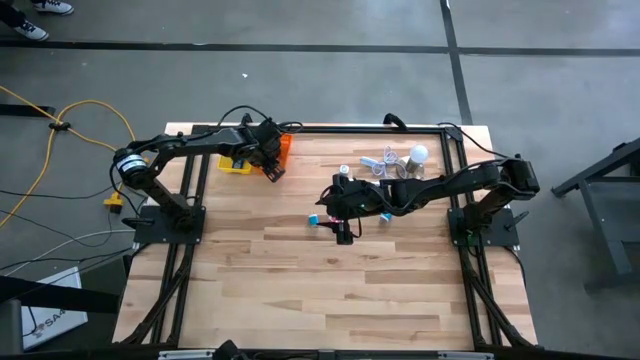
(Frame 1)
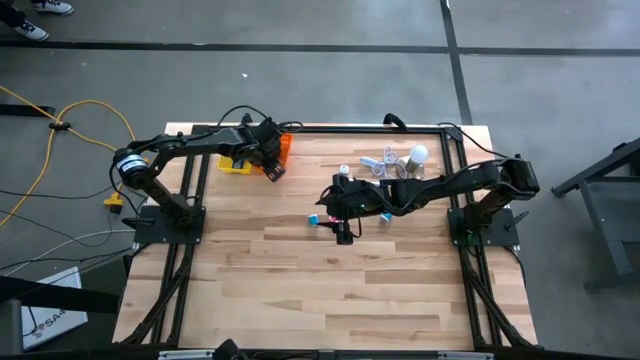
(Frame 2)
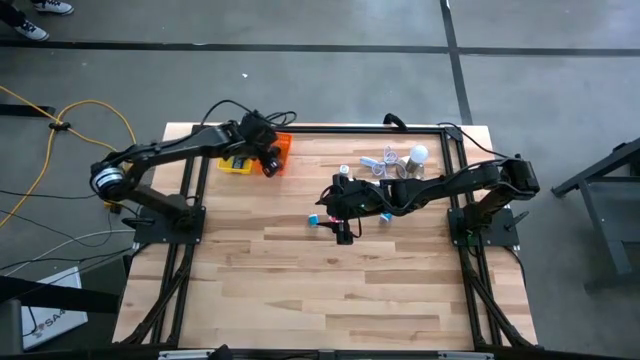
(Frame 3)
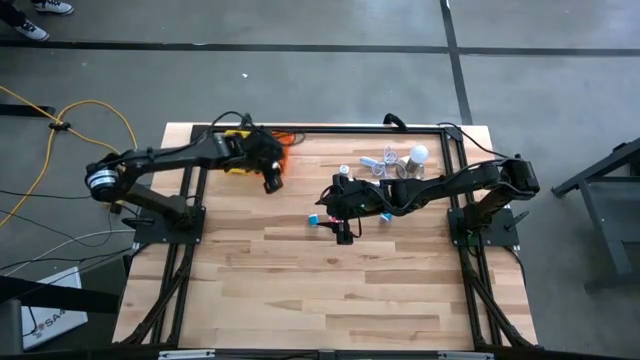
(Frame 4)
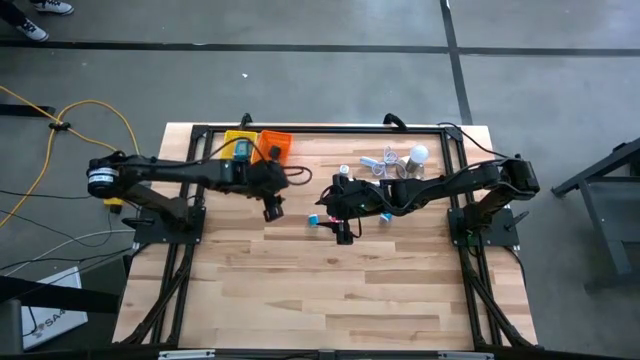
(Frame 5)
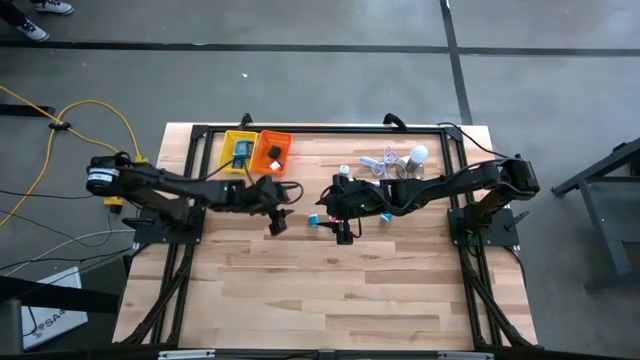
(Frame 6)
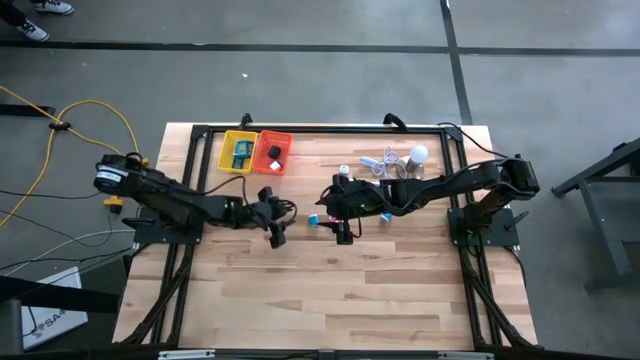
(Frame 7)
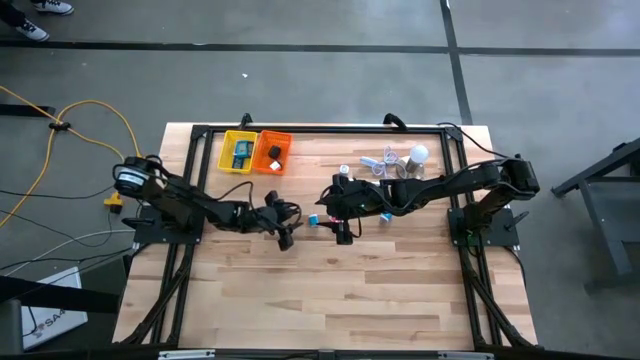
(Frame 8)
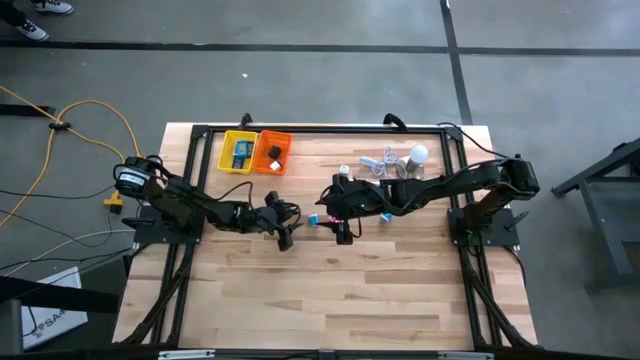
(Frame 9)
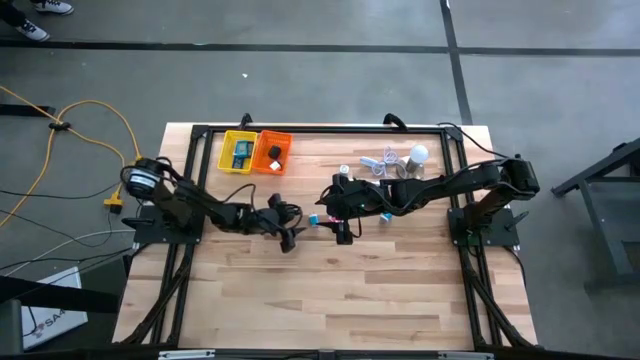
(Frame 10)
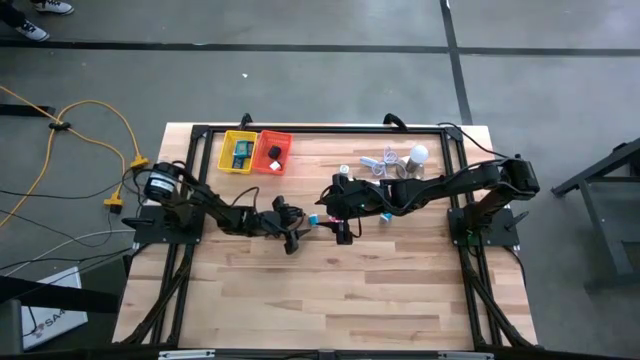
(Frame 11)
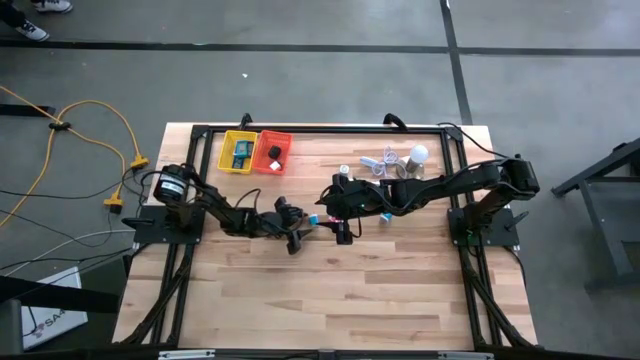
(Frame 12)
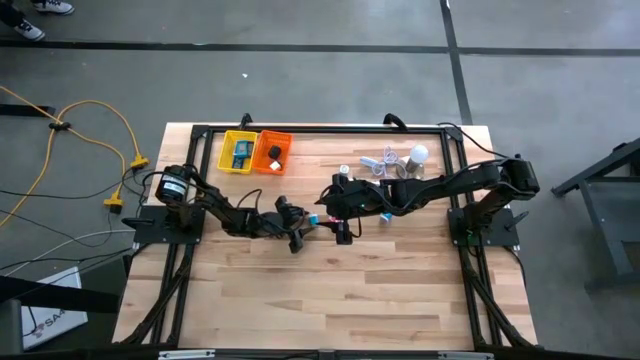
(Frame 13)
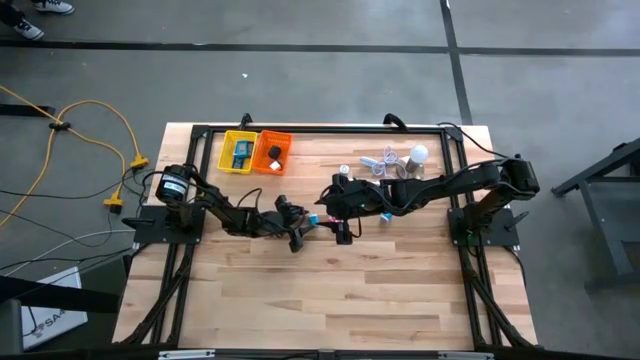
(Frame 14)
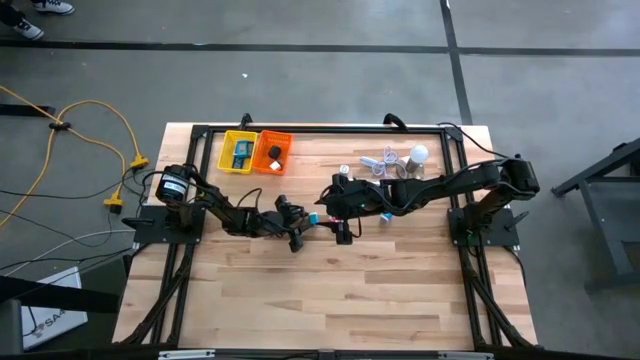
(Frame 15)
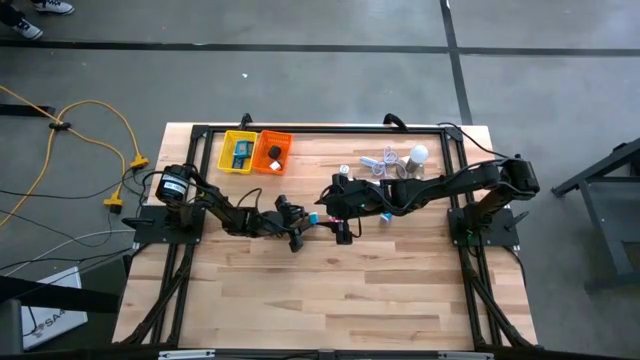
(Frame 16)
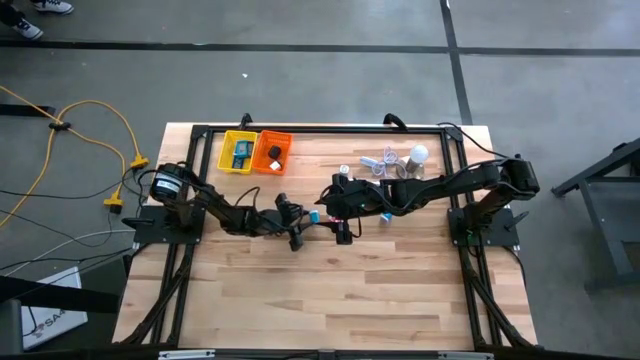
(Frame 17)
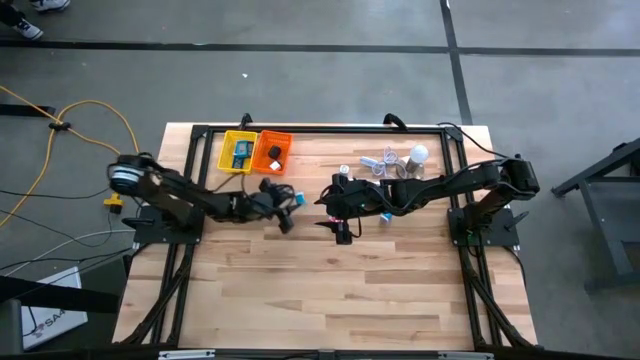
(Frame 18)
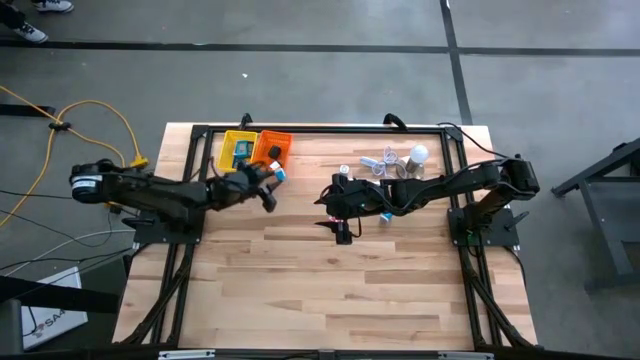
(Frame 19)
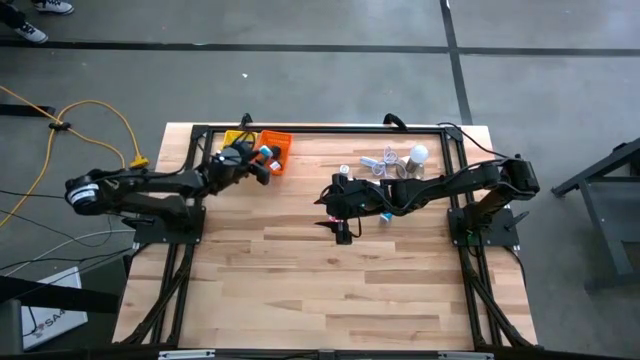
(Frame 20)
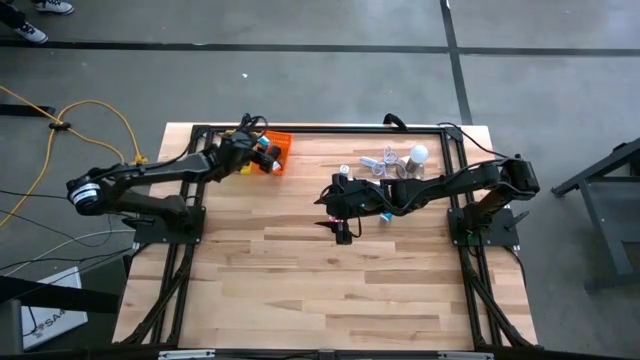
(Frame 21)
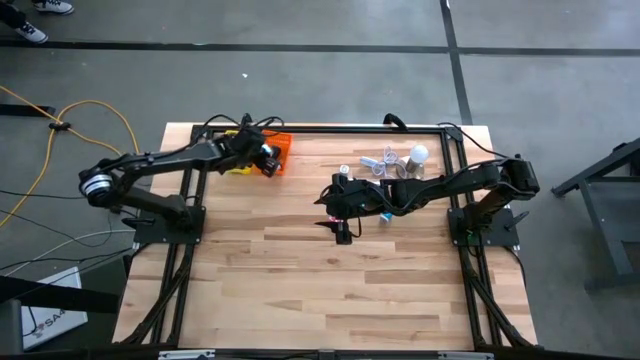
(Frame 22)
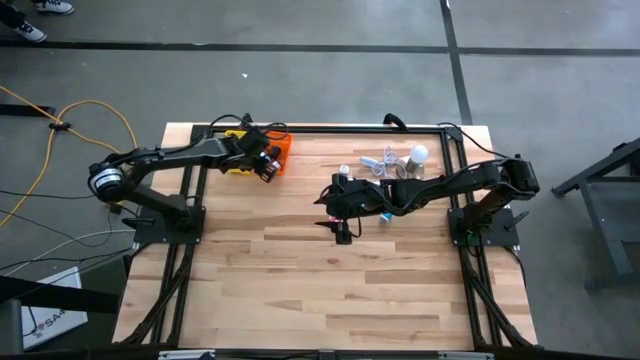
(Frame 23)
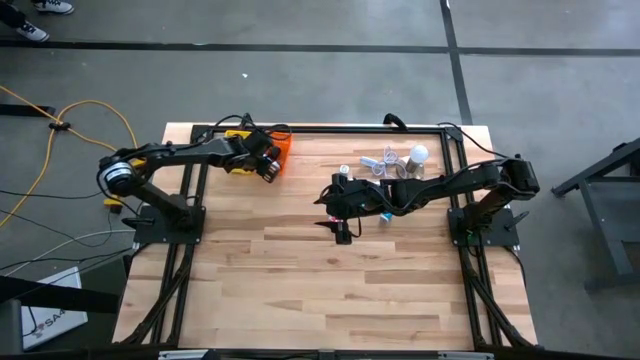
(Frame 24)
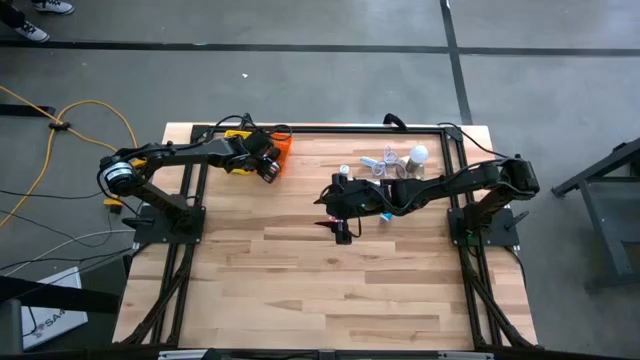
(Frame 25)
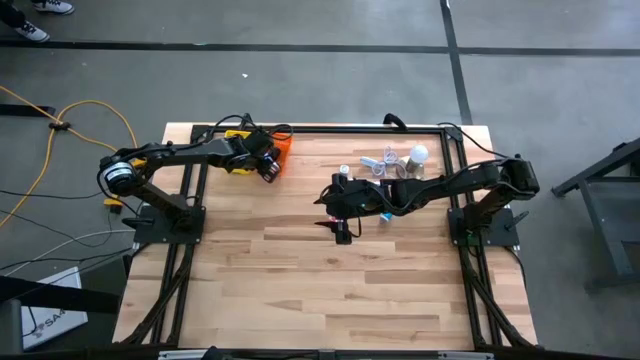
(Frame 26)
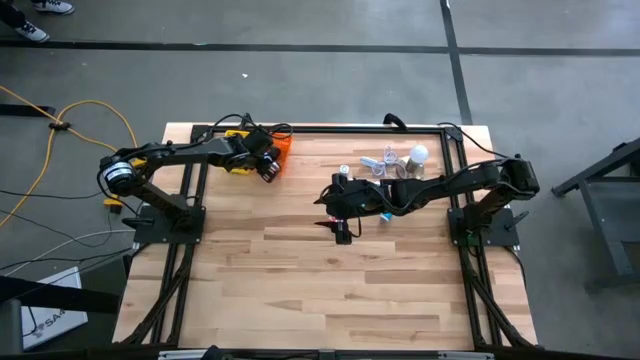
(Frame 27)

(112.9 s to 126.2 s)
Task: Pick & Place Office items
Put the left blue adapter into the orange basket

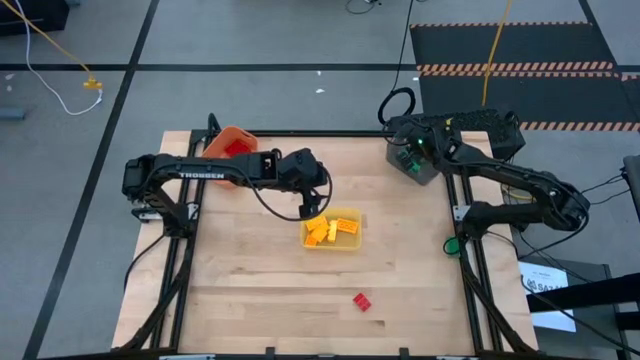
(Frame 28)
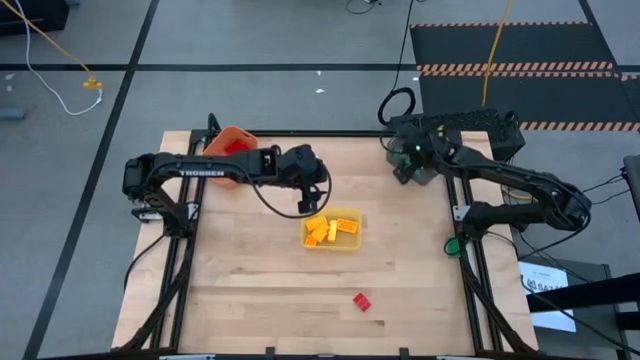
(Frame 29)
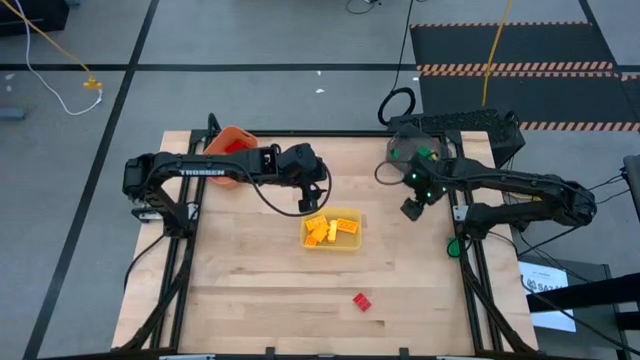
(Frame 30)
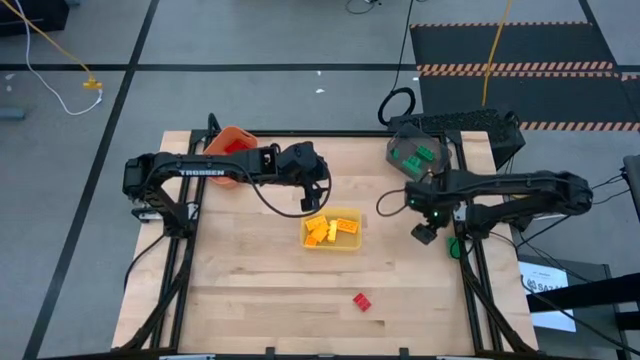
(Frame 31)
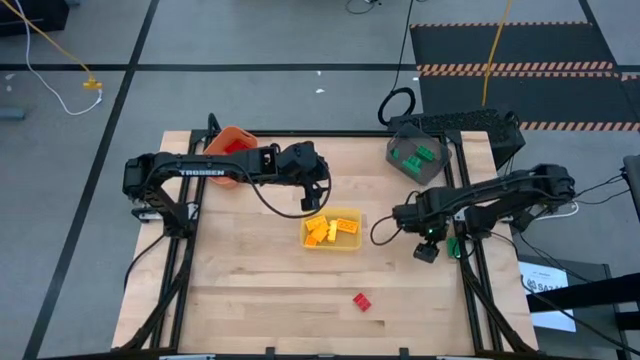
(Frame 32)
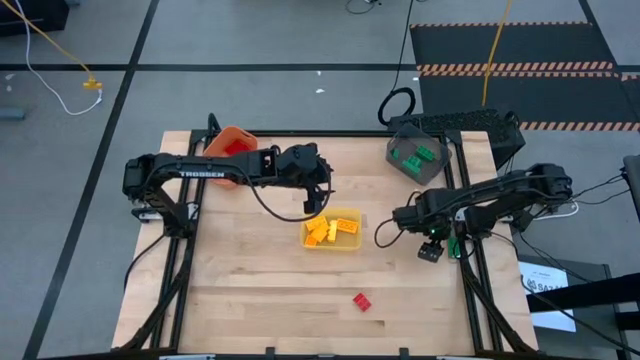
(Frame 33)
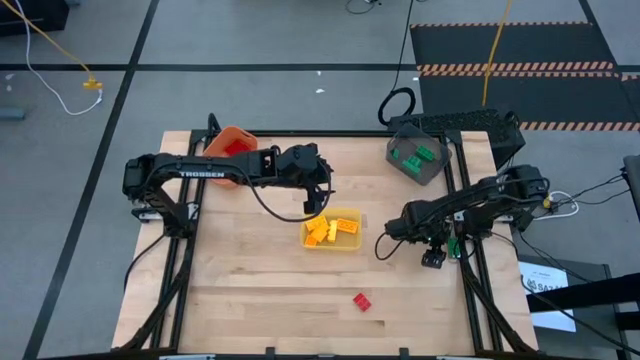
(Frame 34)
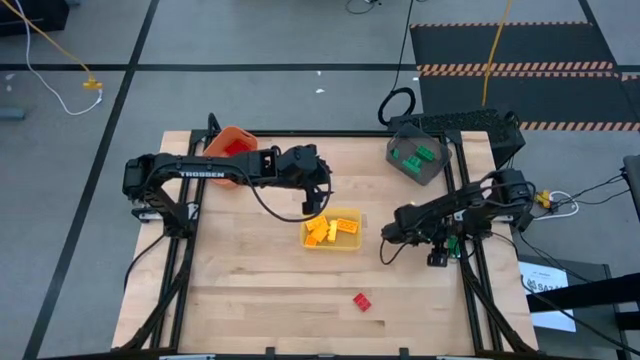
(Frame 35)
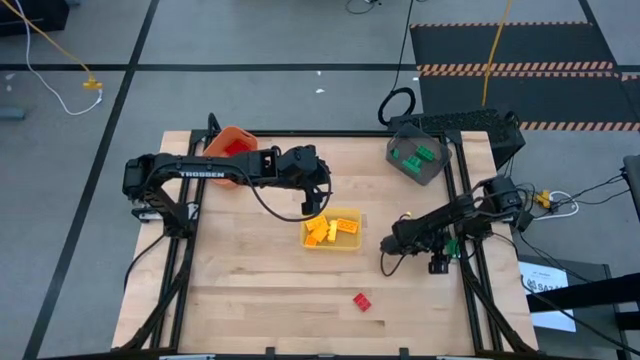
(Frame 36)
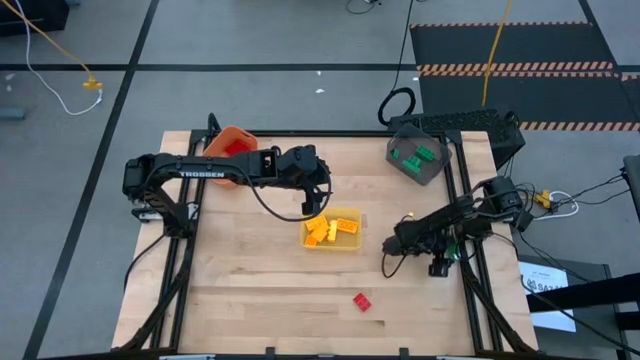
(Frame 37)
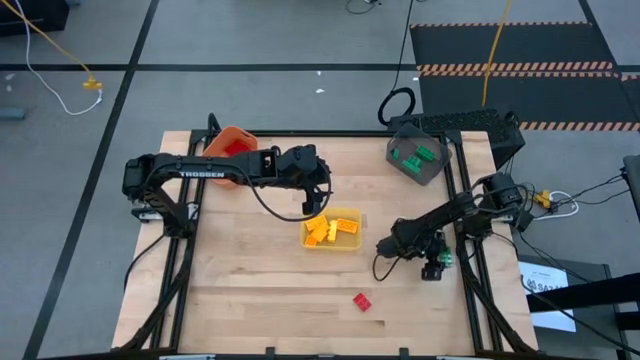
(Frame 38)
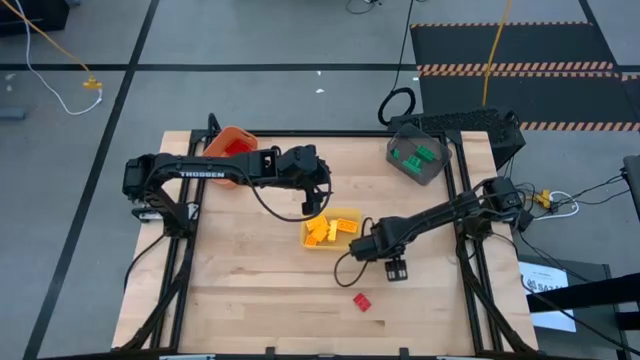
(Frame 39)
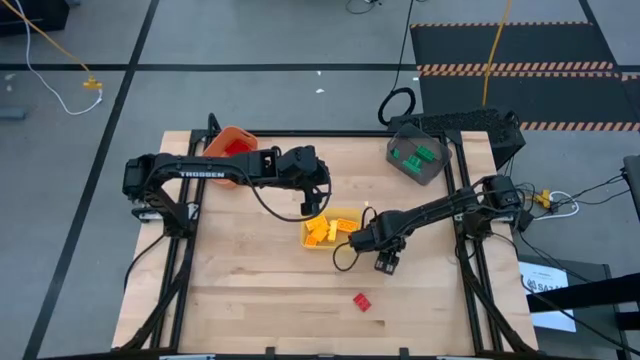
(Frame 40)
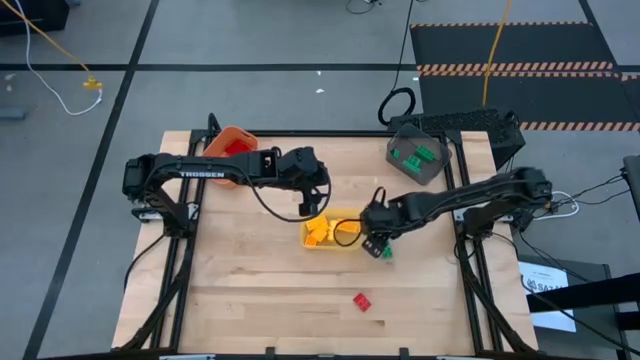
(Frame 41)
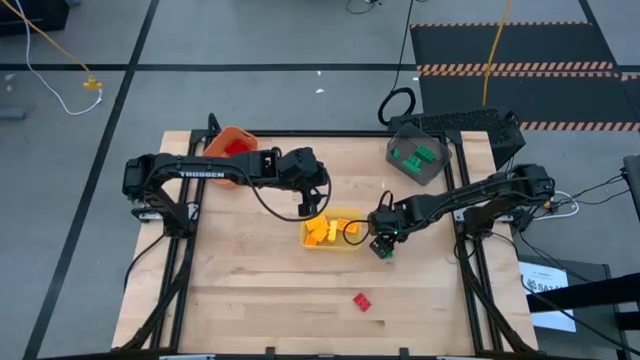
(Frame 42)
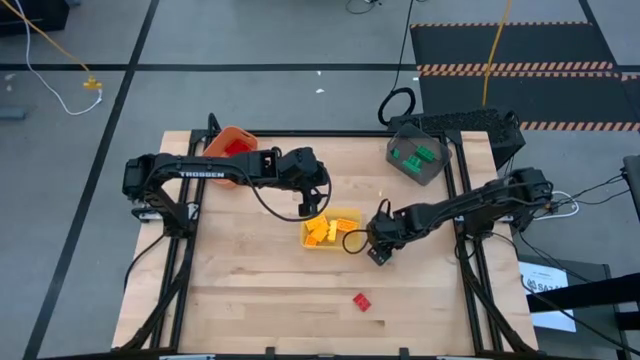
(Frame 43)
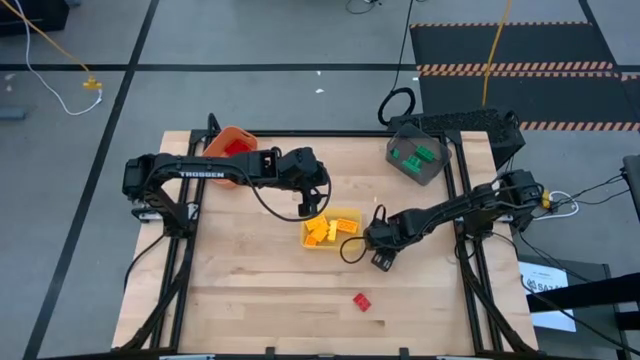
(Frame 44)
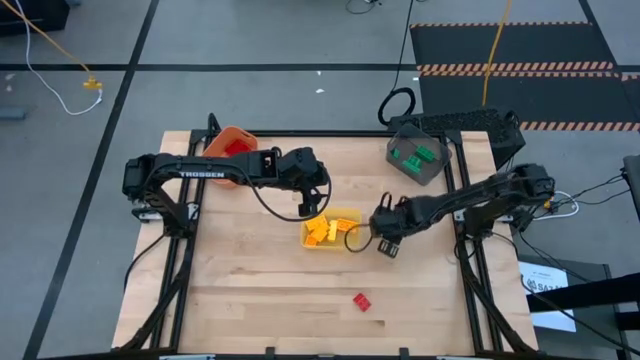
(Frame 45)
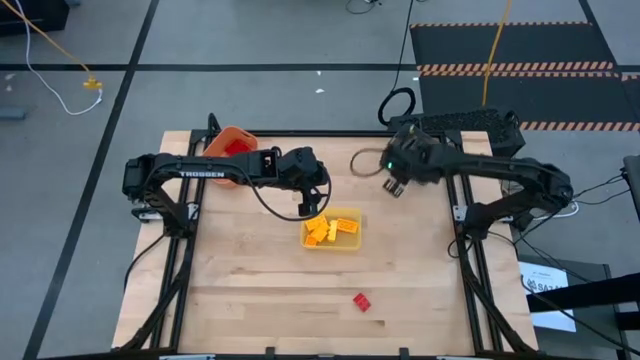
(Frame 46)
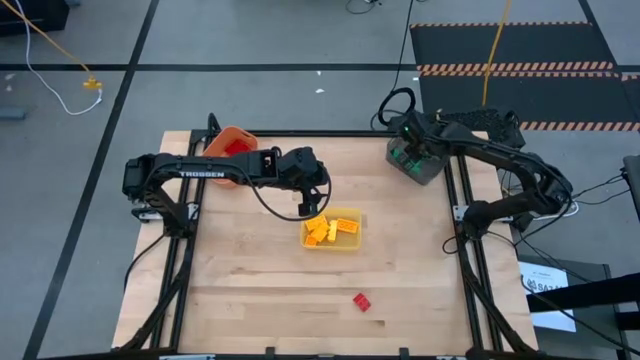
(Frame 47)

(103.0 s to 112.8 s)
Task: Sort & place blocks by color
Put the green 8-stud game piece into the black bin
